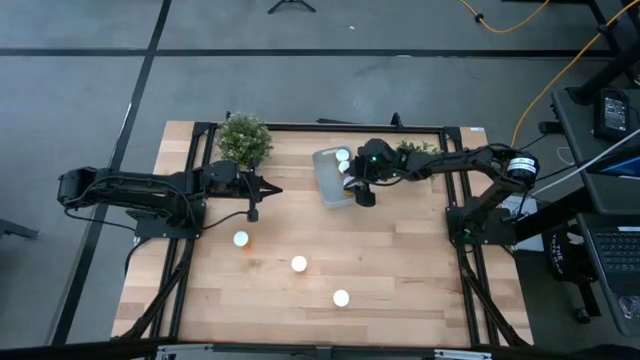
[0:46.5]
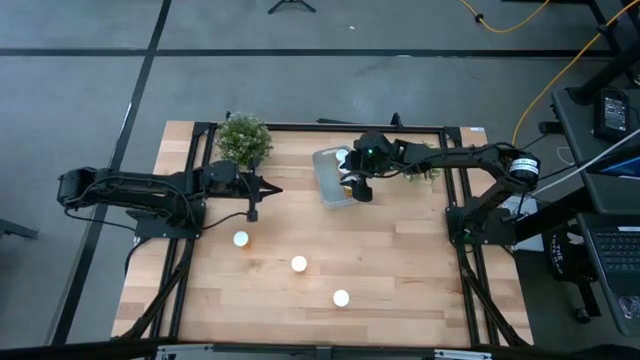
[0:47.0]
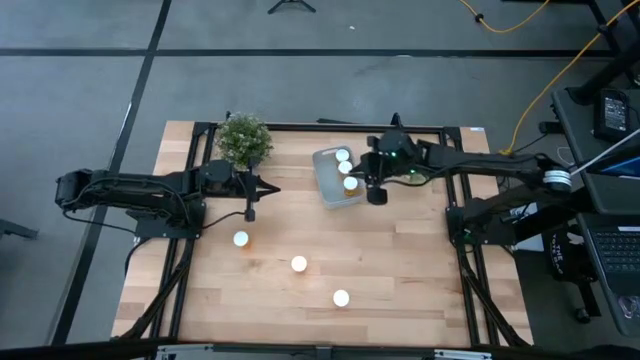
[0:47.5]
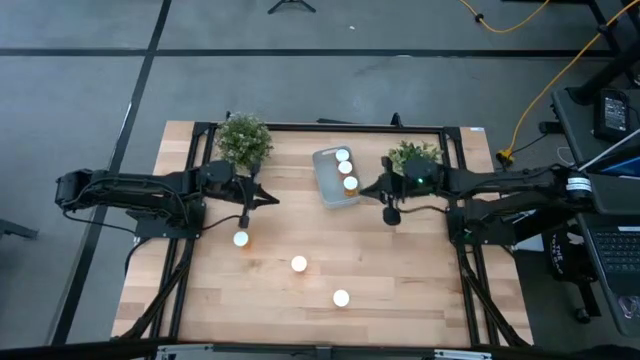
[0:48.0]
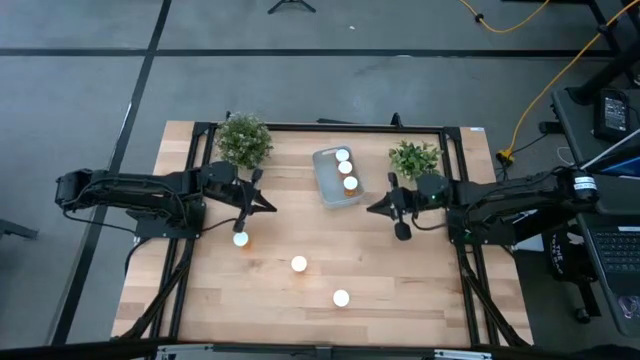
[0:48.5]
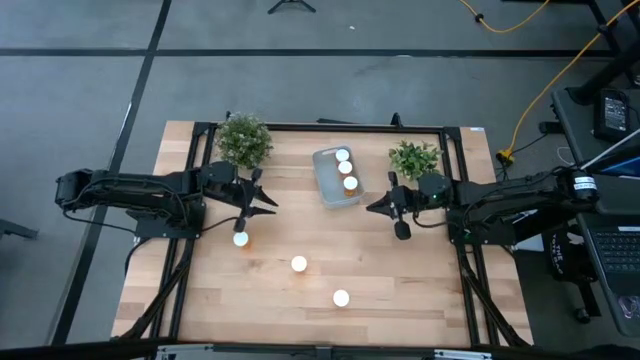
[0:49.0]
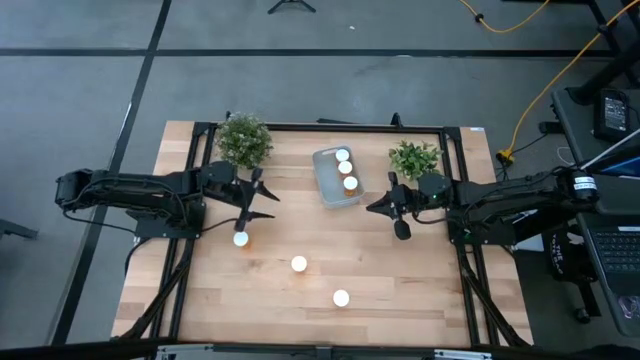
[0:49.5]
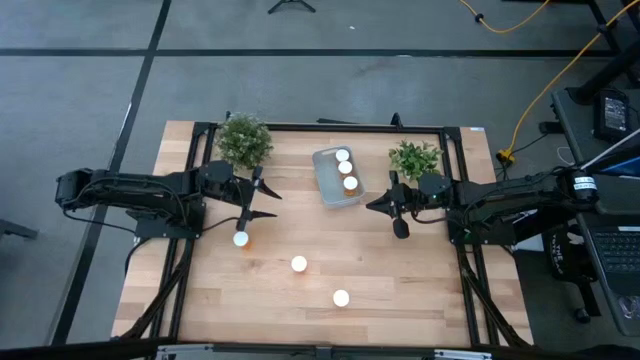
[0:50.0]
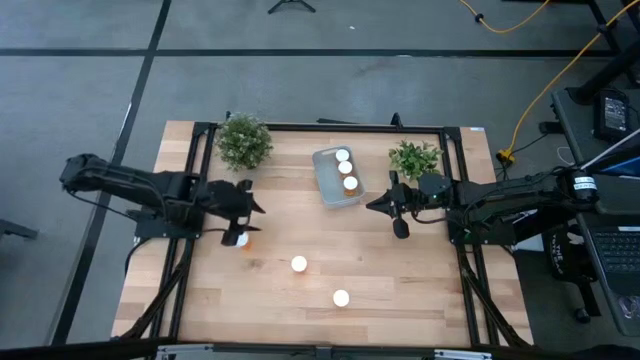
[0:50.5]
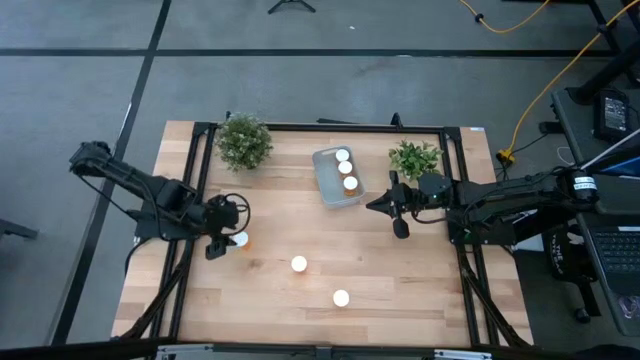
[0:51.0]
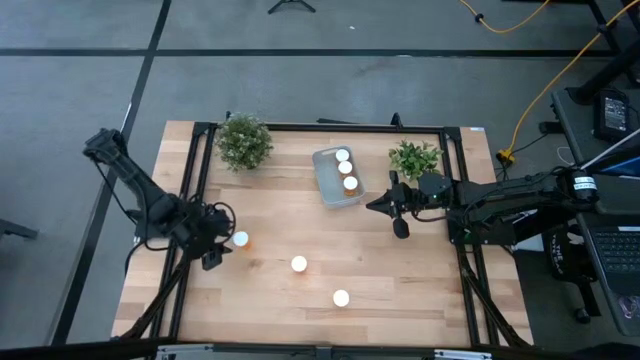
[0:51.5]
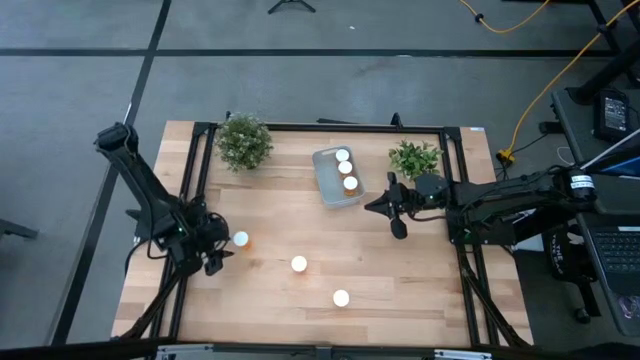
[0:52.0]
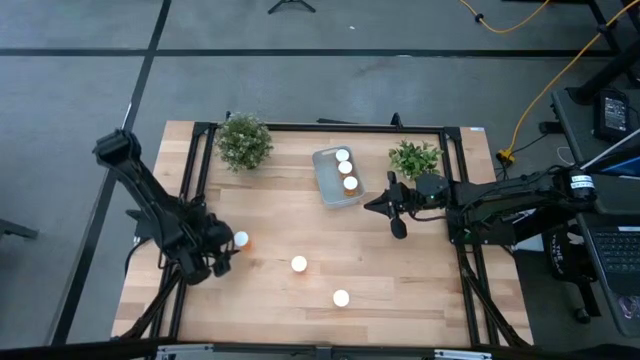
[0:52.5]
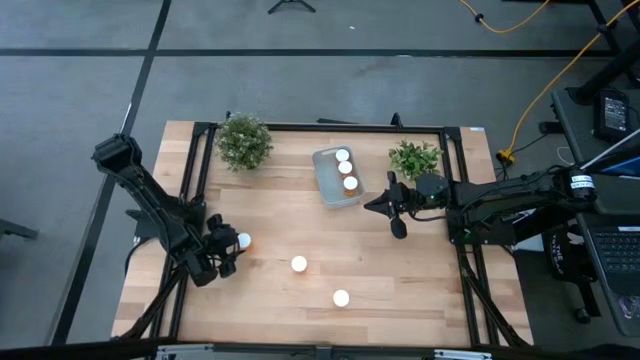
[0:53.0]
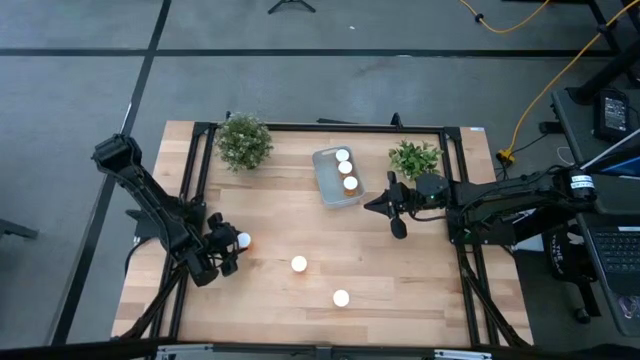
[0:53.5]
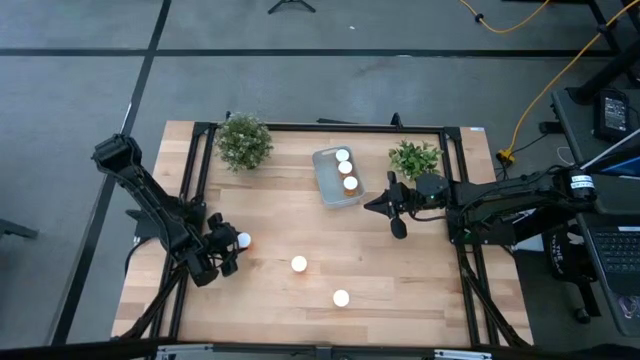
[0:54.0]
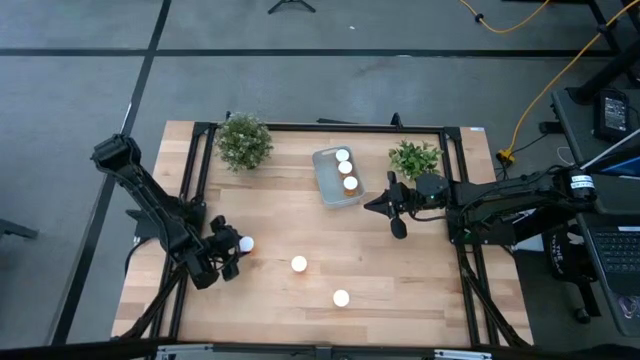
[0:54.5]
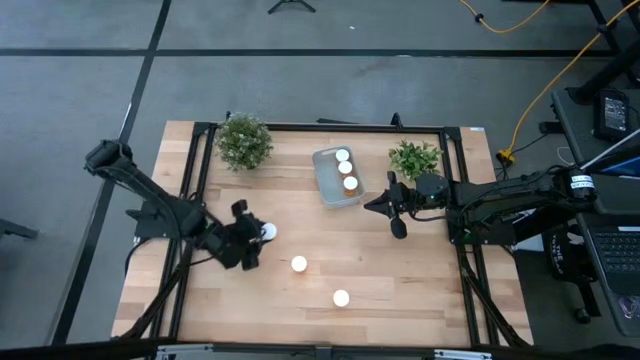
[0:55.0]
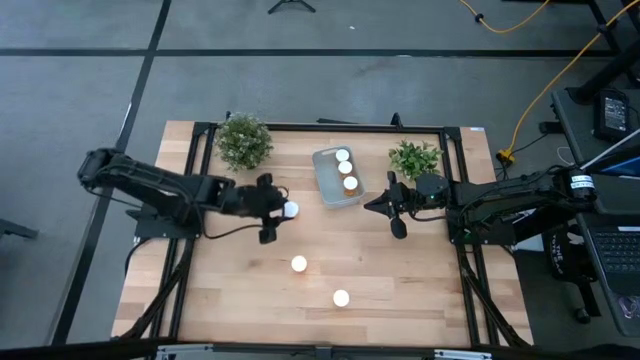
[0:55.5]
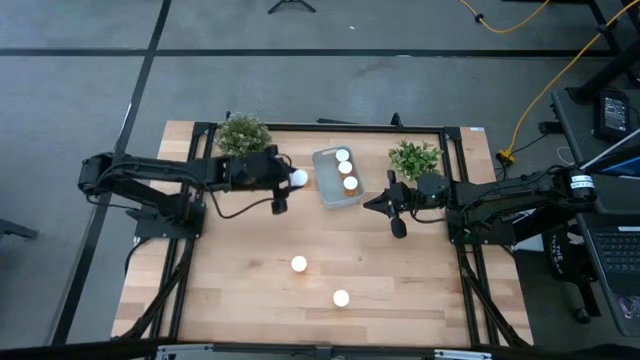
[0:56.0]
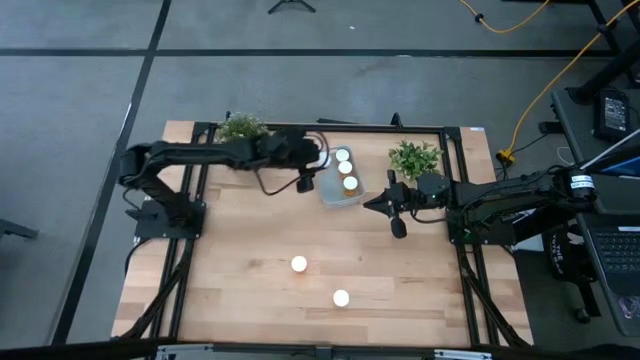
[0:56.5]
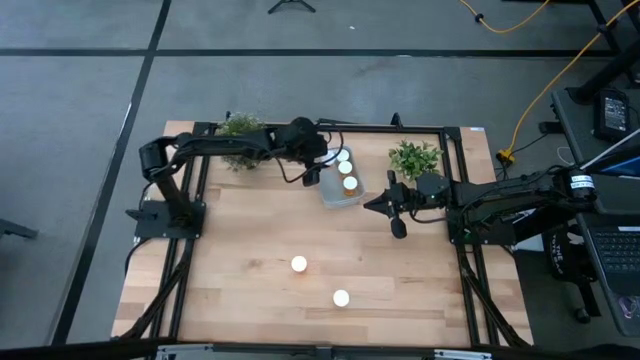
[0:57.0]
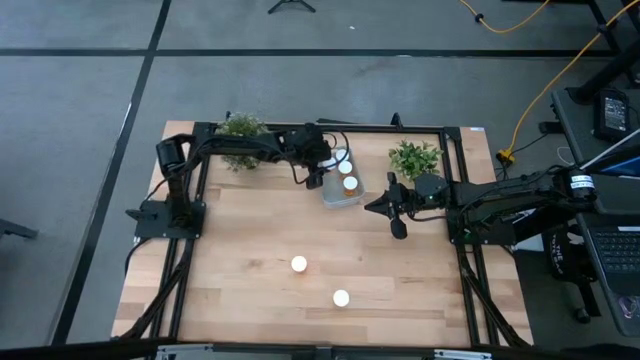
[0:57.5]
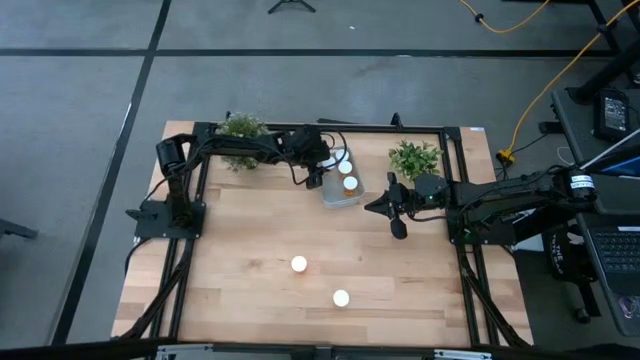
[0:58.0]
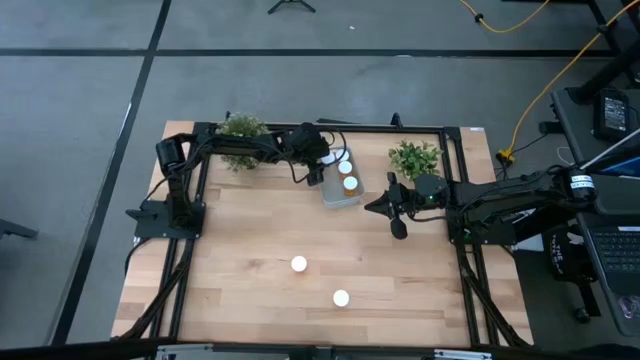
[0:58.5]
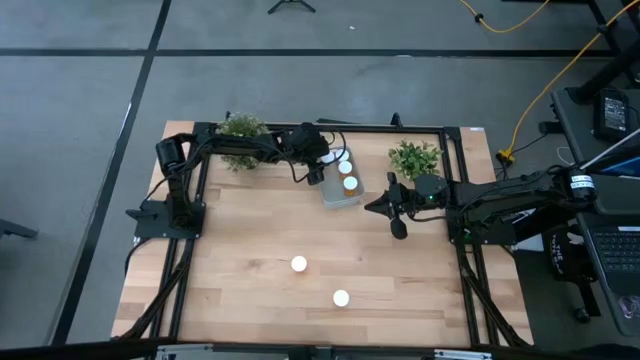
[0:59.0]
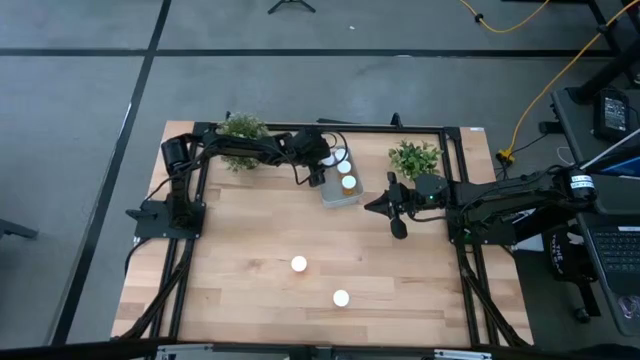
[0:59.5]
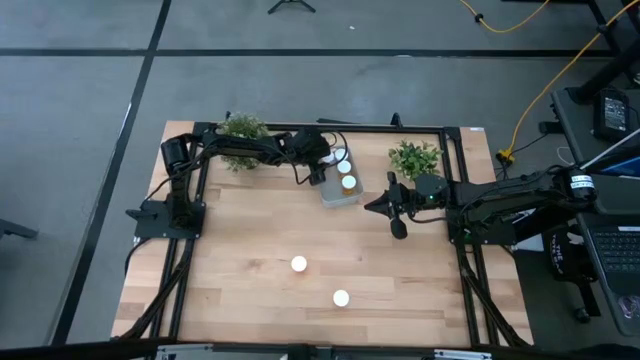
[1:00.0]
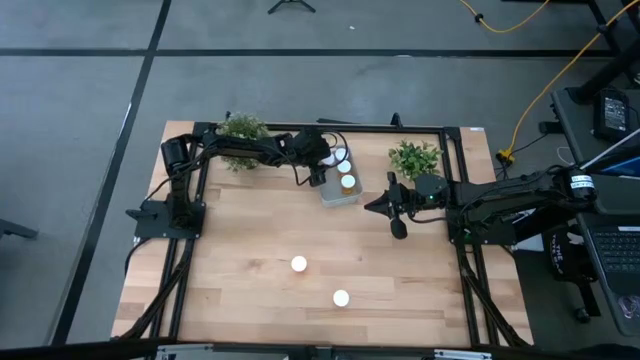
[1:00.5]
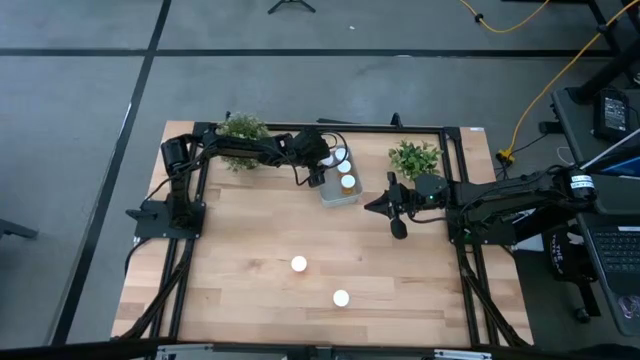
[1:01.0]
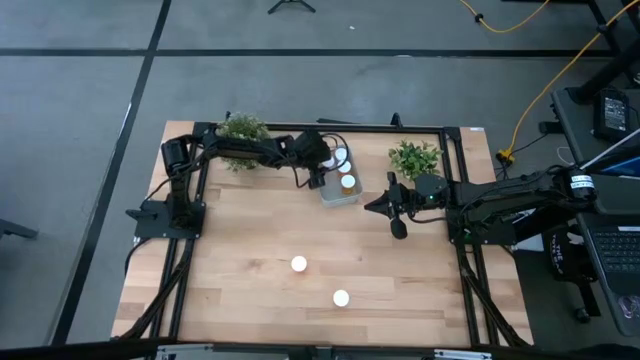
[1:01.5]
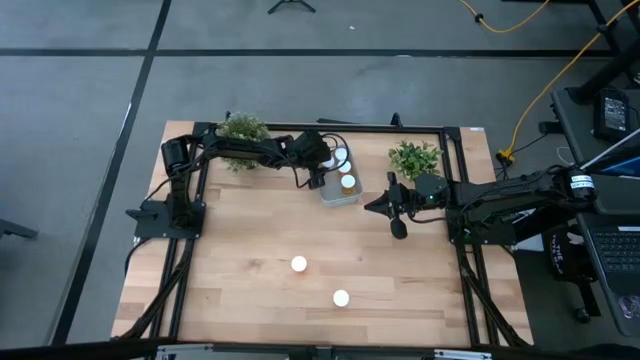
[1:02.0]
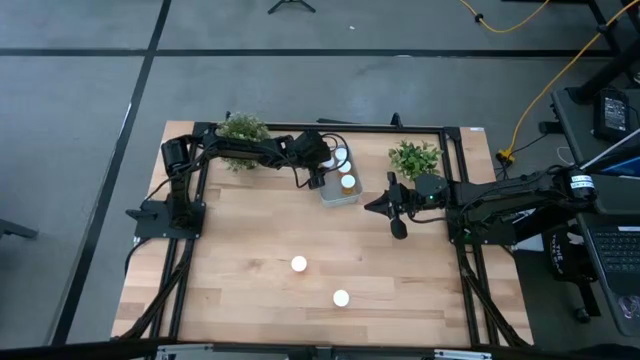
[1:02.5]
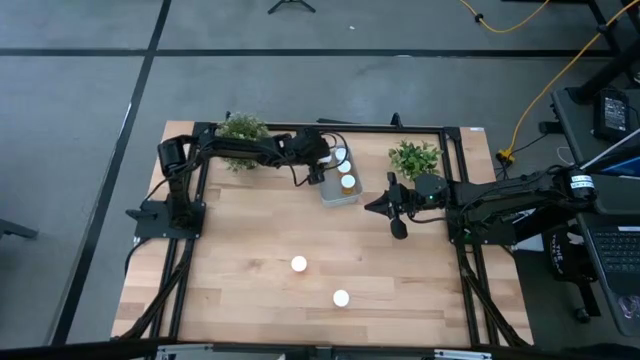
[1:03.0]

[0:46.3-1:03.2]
Task: Pick and place pill bottles into a basket
Put the orange pill bottle into the gray bin

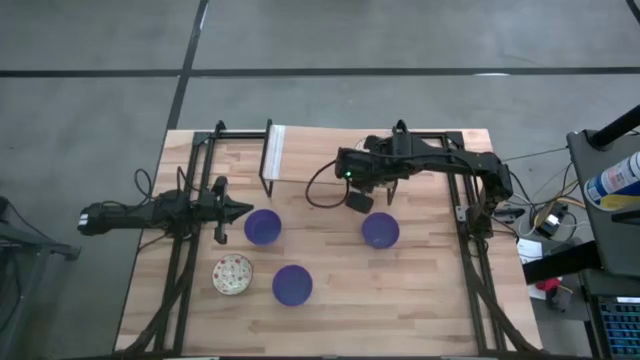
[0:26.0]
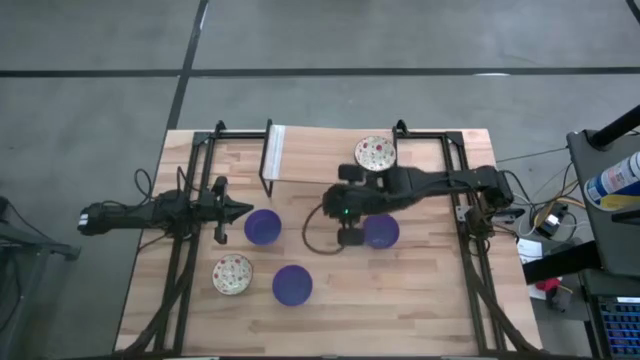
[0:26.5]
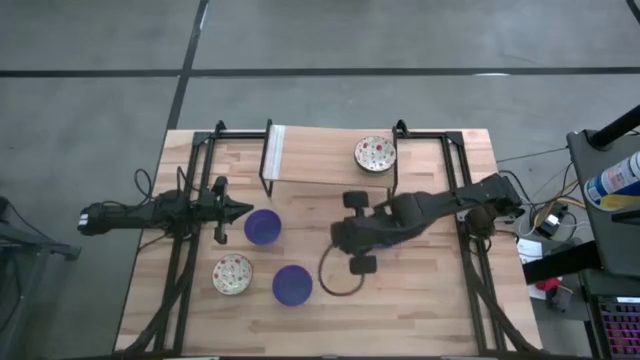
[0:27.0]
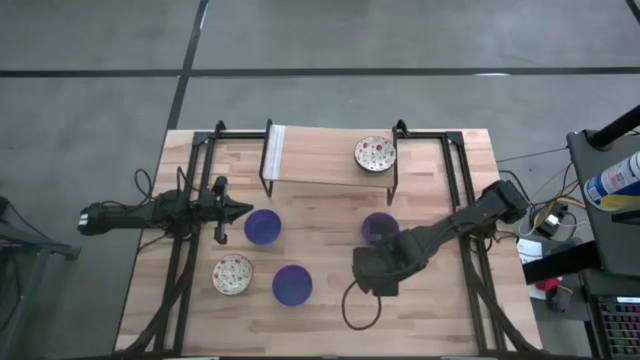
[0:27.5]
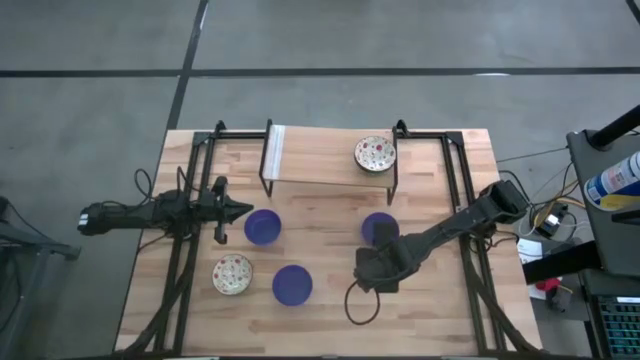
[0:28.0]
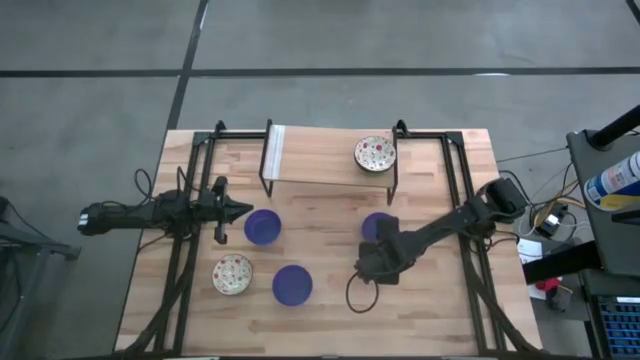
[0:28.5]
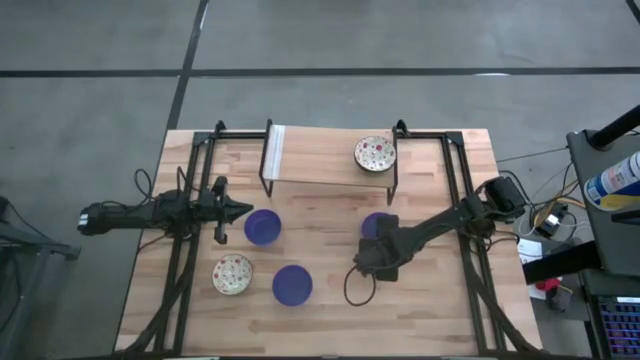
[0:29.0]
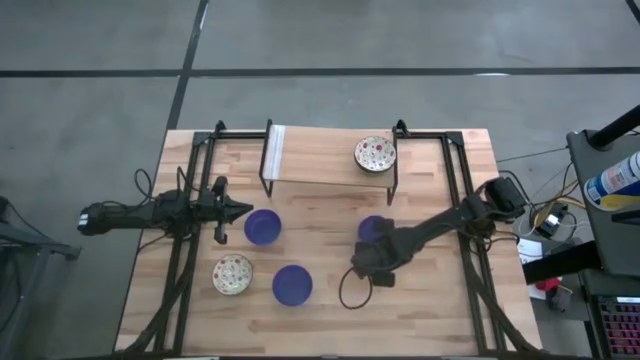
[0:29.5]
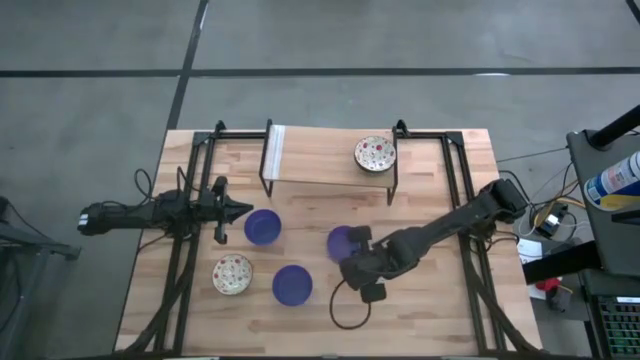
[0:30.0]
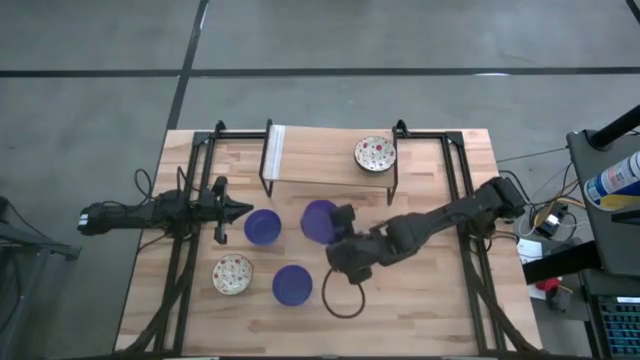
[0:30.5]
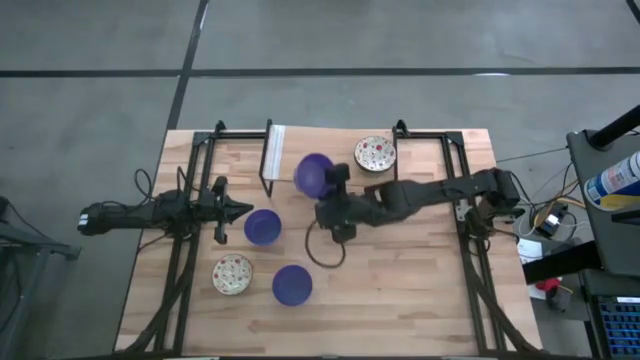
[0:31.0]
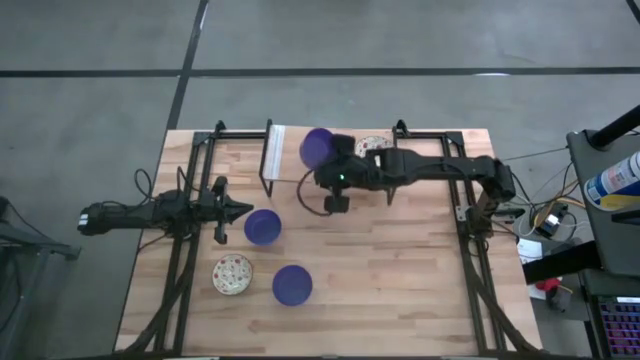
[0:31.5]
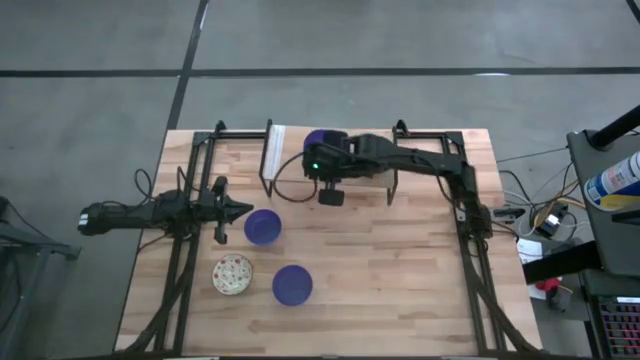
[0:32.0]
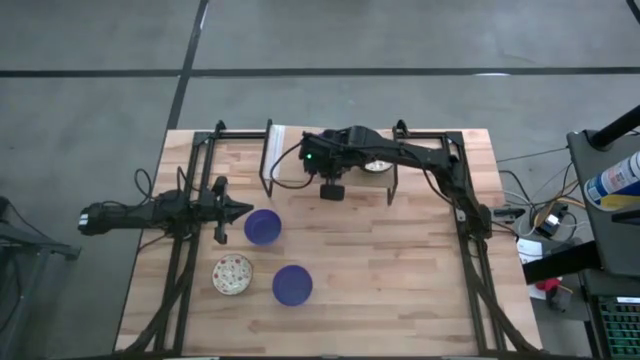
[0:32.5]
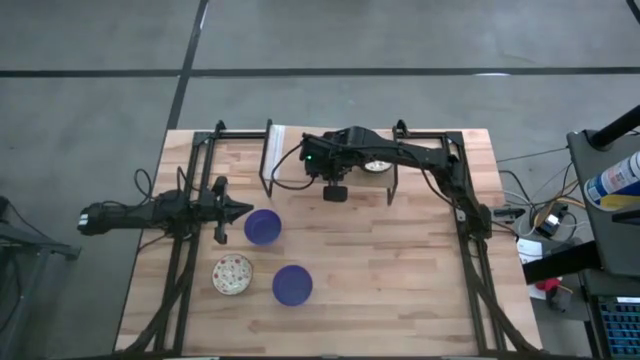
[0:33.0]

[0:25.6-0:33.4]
Task: Pick & Place Mini bowls
Put the top right blue bowl on the shelf
